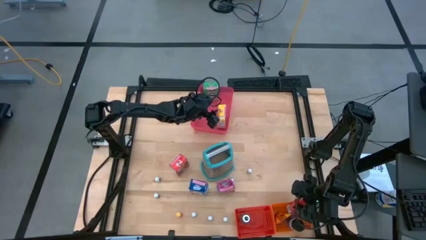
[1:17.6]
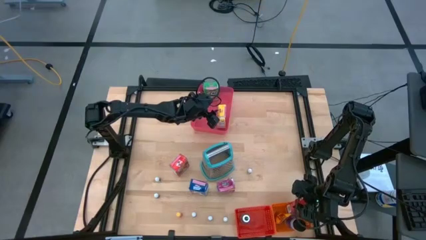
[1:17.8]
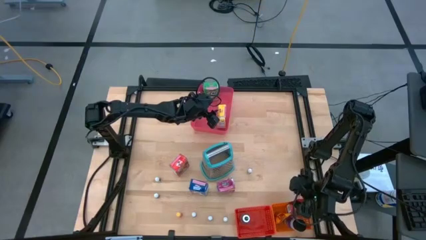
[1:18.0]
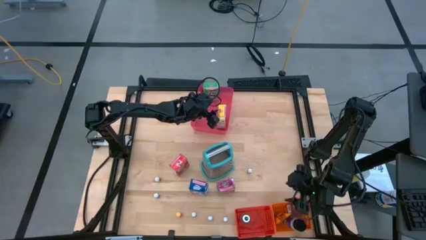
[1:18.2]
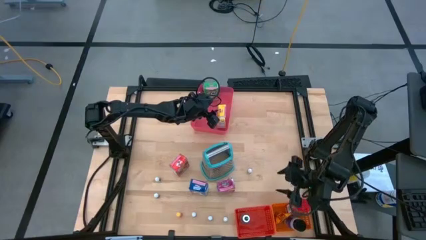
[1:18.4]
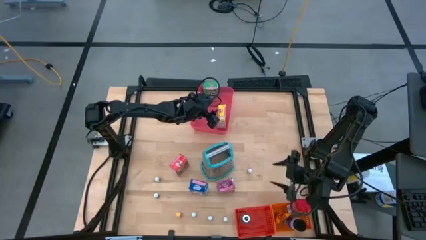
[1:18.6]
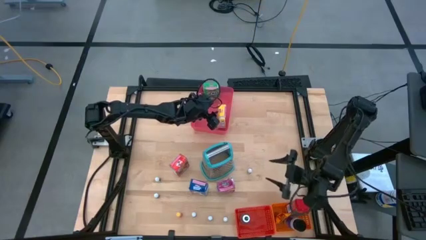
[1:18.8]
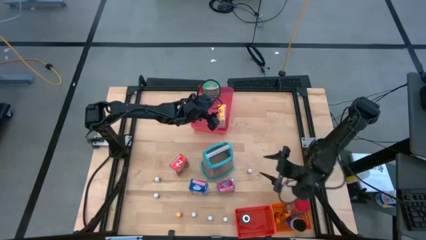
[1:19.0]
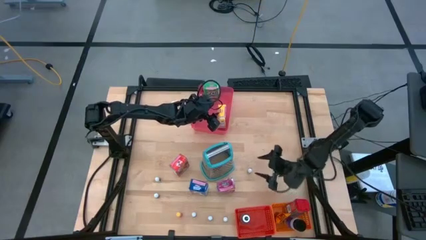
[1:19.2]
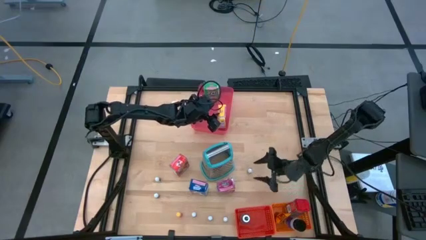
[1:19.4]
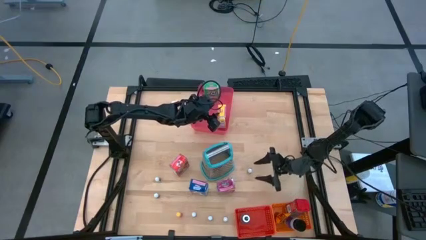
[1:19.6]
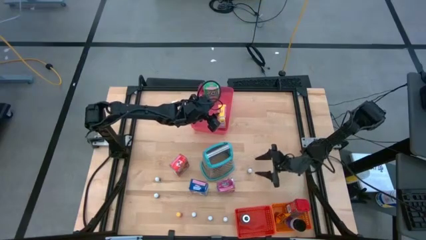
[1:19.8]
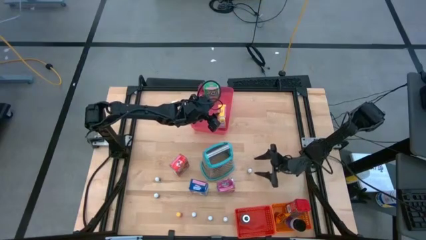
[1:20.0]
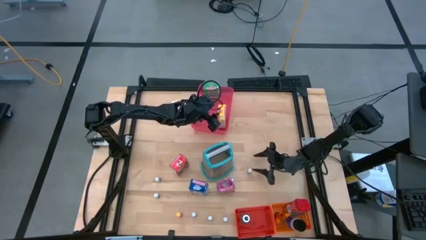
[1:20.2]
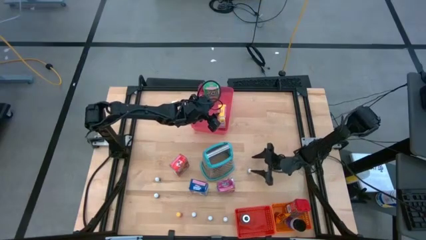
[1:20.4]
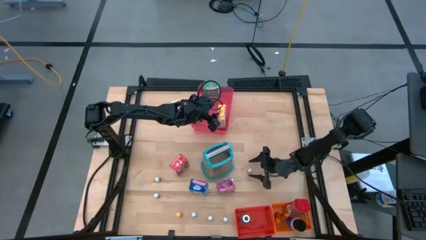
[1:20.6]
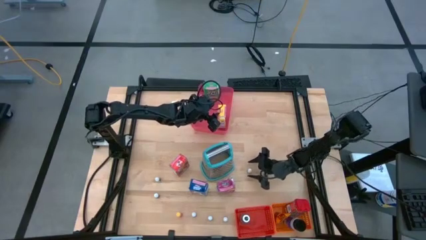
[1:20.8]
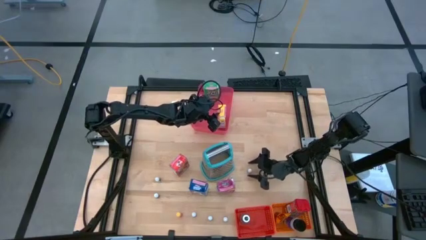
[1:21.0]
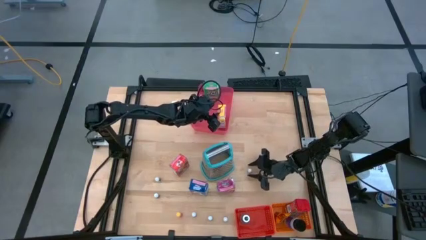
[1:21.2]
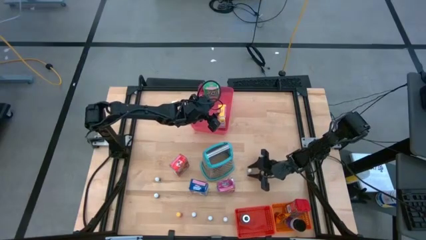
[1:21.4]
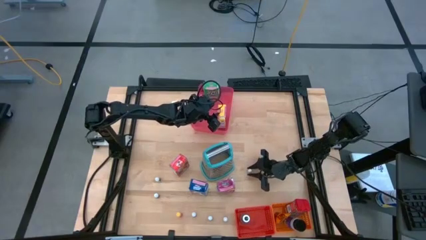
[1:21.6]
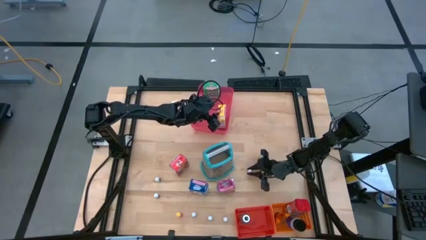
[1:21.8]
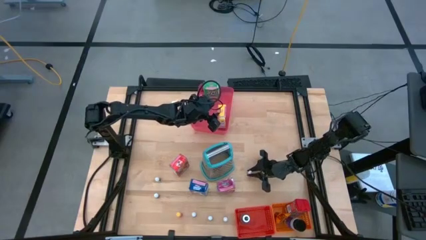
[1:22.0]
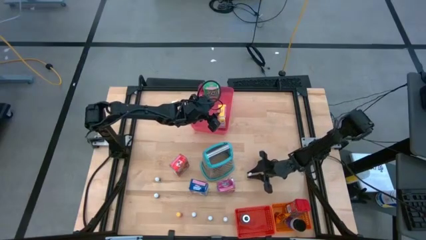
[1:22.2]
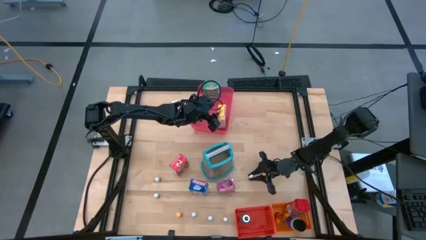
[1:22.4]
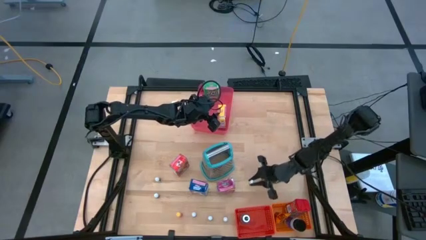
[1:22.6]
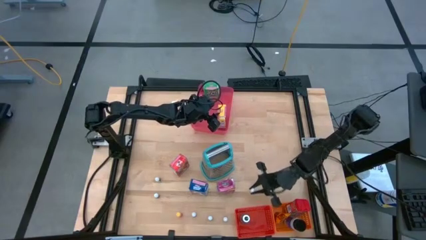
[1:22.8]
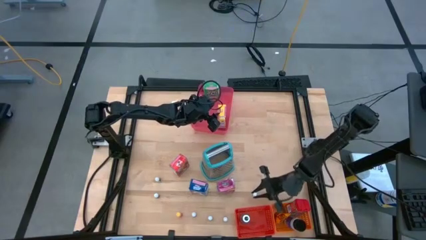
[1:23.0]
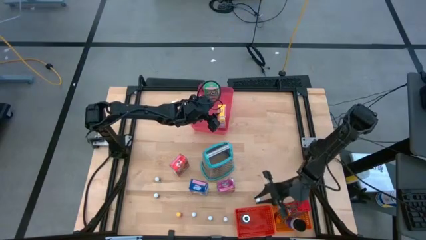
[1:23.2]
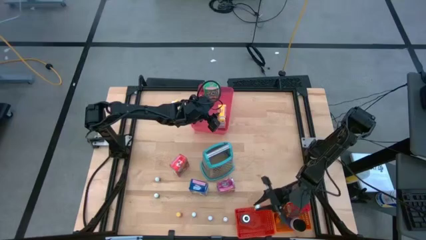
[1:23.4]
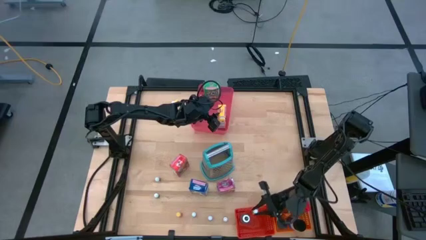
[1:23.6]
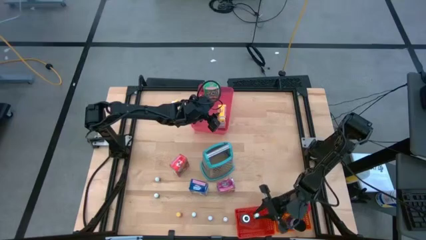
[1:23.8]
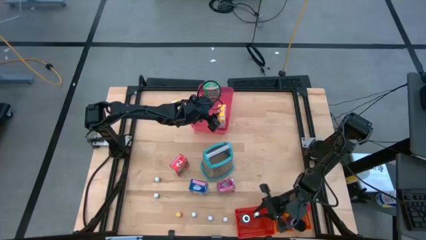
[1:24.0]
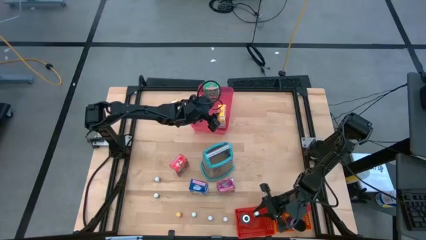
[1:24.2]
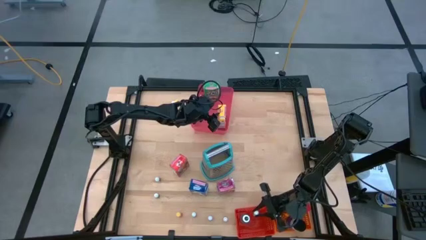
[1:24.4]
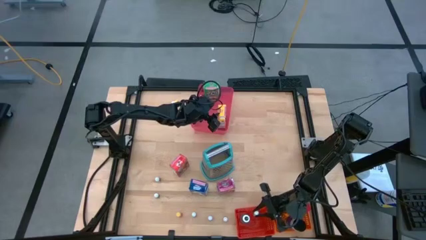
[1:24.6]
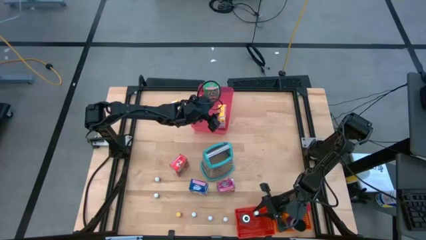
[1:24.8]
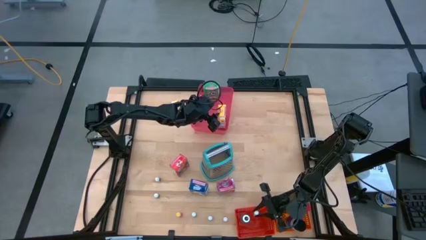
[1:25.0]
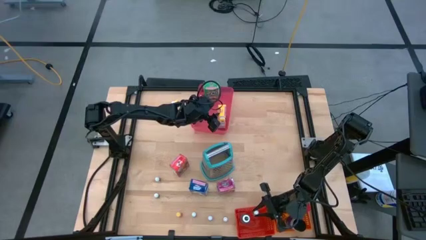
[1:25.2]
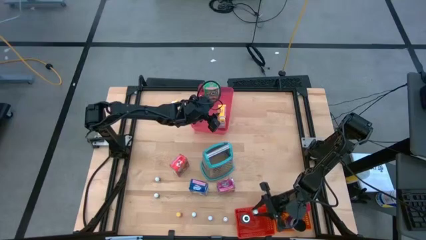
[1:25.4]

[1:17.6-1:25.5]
Task: Pick & Place Kitchen Items
Put the black food coloring bottle into the red bin

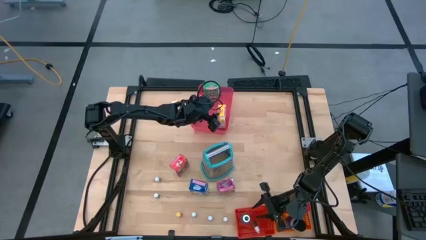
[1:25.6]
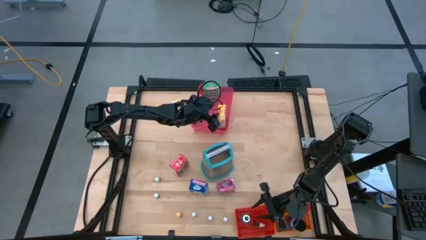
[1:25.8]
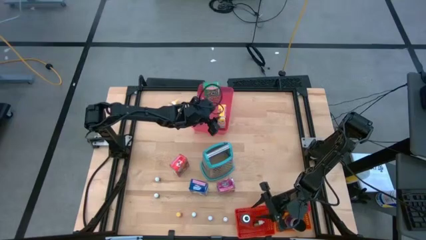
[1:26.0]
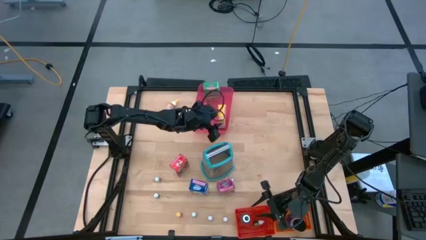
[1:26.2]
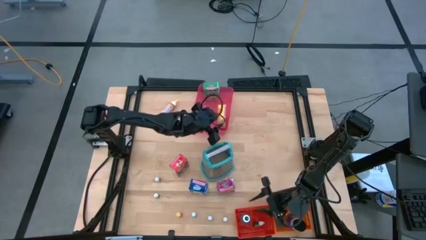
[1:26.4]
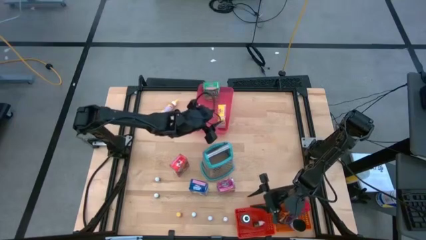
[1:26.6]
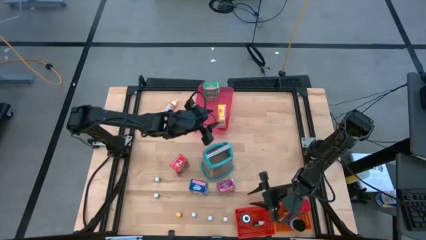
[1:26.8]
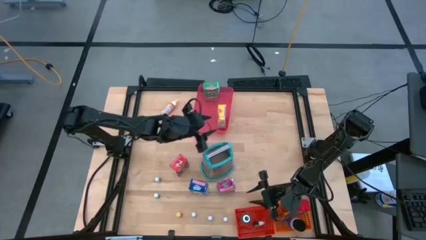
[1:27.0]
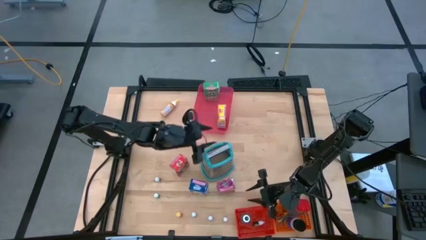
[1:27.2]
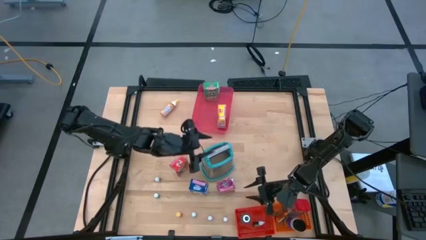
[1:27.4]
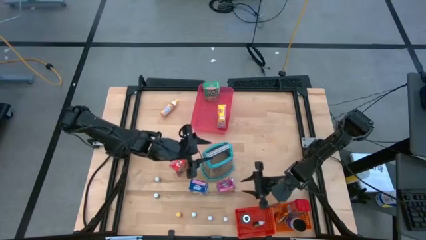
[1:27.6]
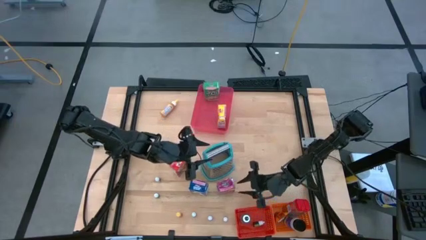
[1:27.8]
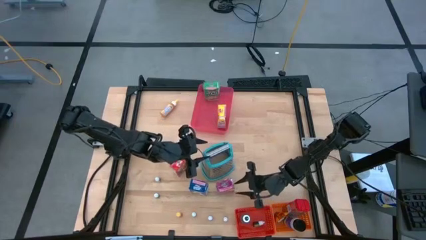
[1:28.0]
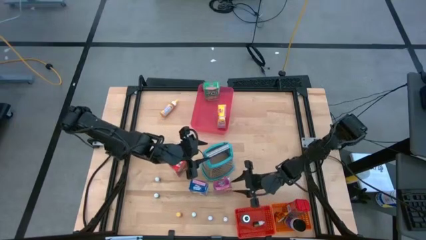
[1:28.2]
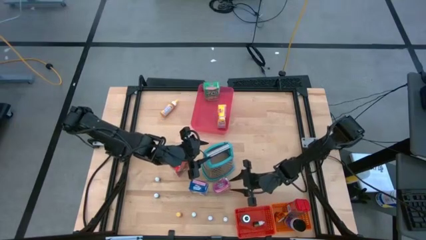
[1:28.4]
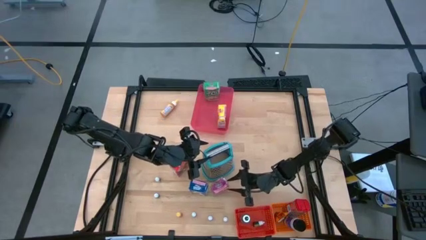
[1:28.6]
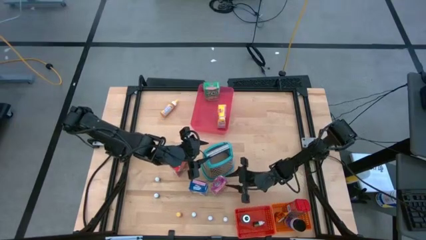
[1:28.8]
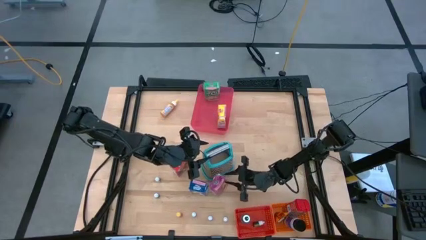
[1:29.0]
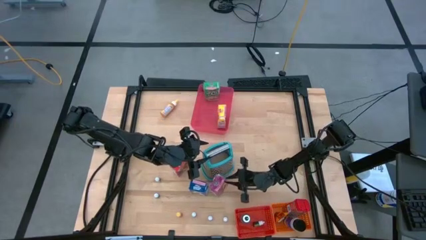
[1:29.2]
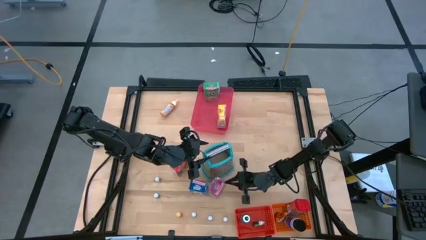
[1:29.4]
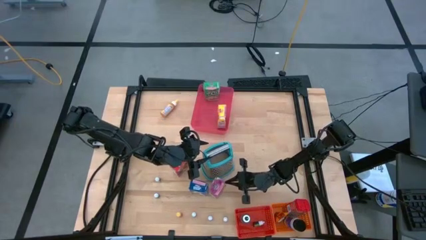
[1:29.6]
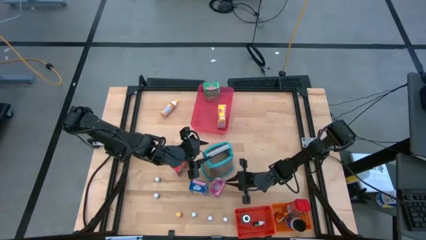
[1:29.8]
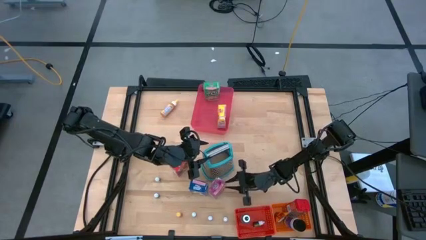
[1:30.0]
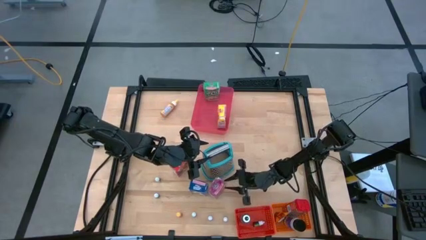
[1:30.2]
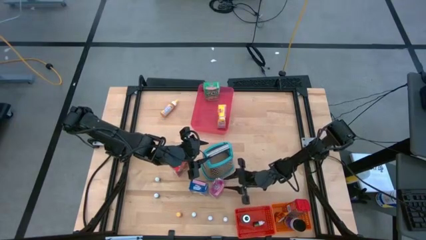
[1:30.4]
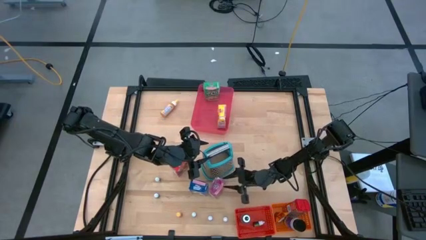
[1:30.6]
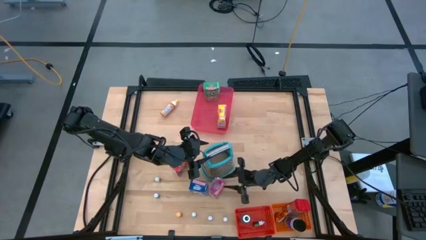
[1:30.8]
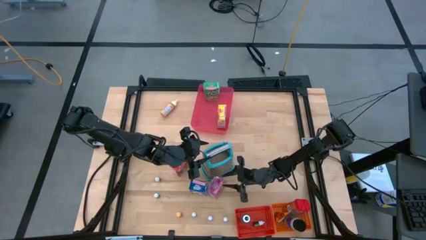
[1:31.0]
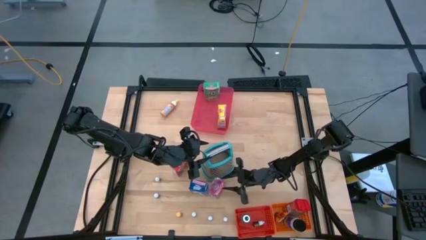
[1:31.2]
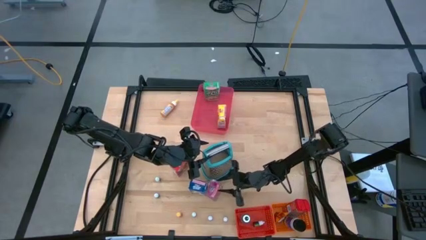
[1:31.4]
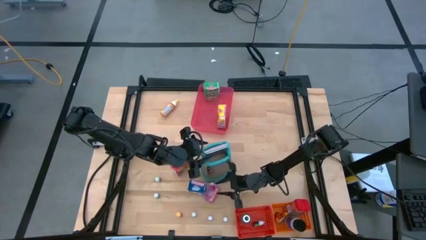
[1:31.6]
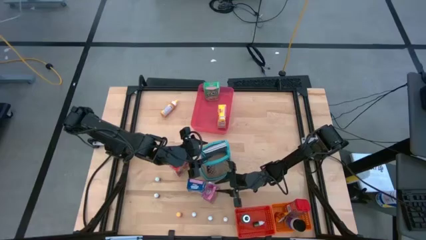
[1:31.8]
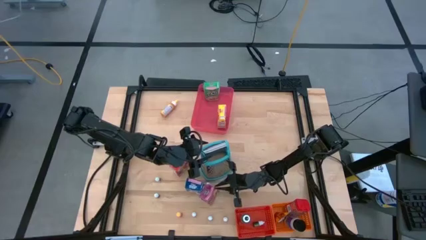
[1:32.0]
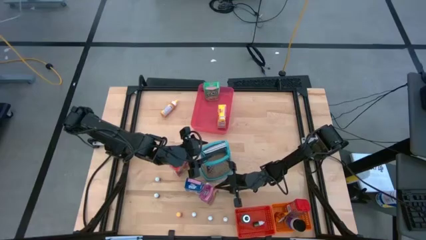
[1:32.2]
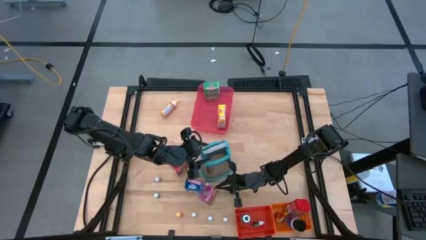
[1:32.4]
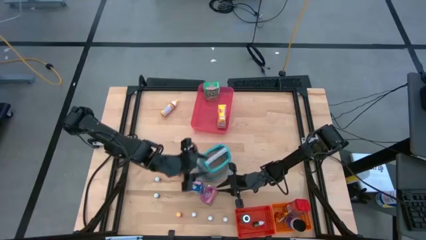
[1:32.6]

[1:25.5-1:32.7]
Put the purple cereal box into the pink bin
